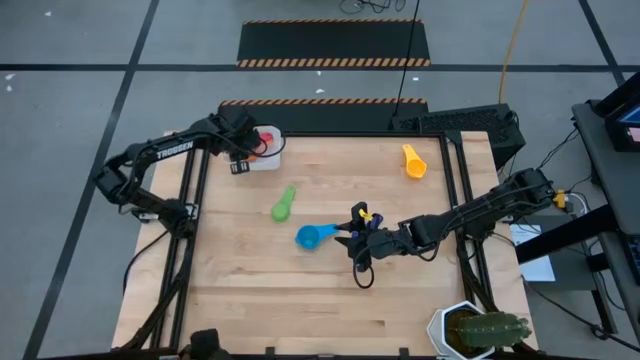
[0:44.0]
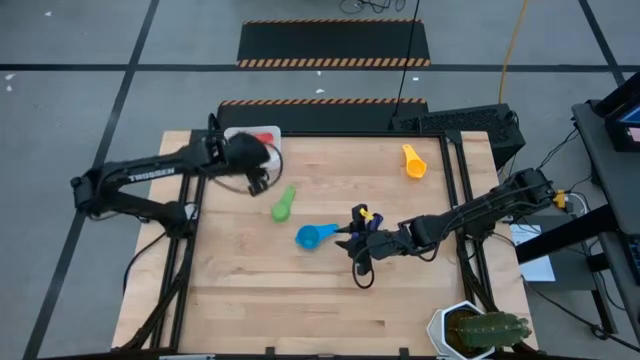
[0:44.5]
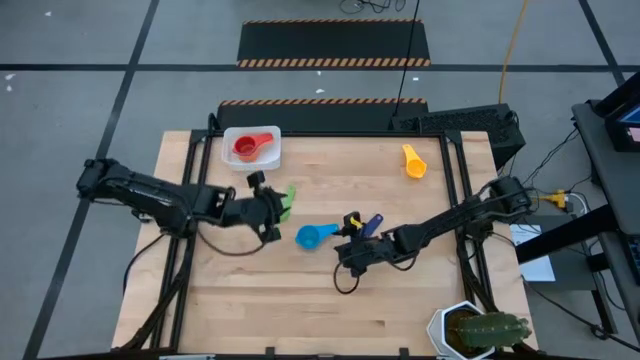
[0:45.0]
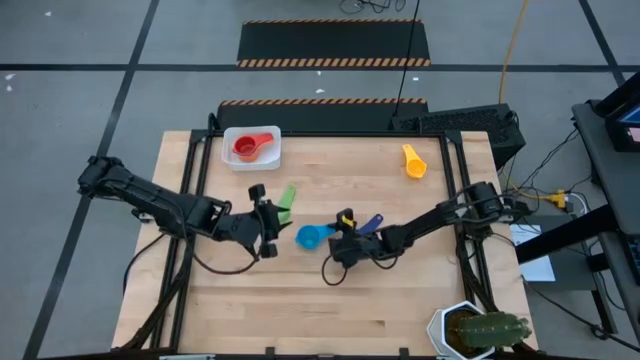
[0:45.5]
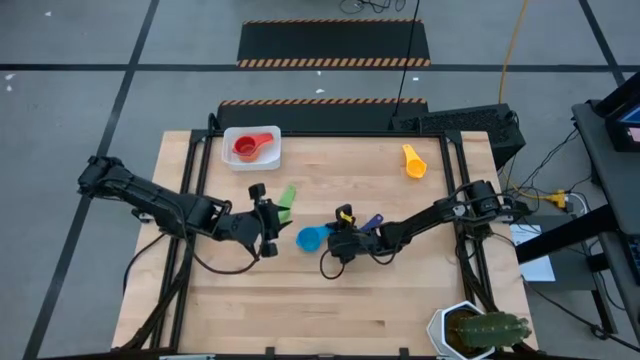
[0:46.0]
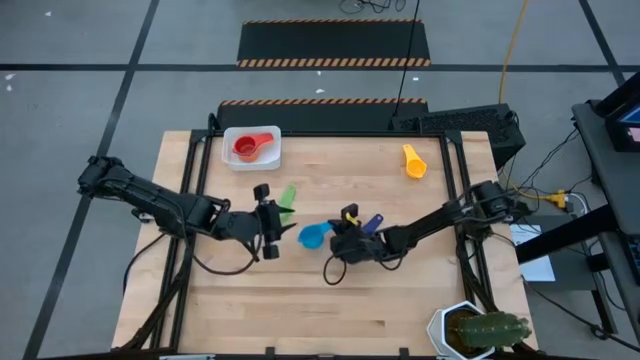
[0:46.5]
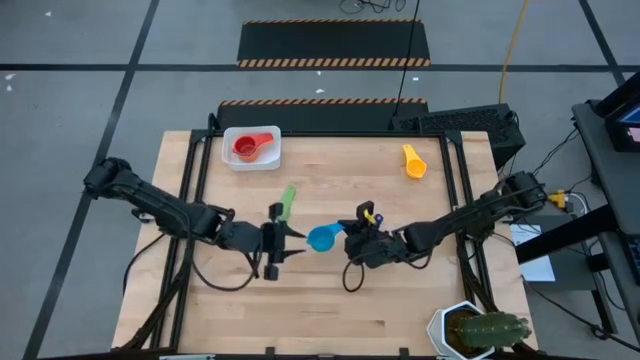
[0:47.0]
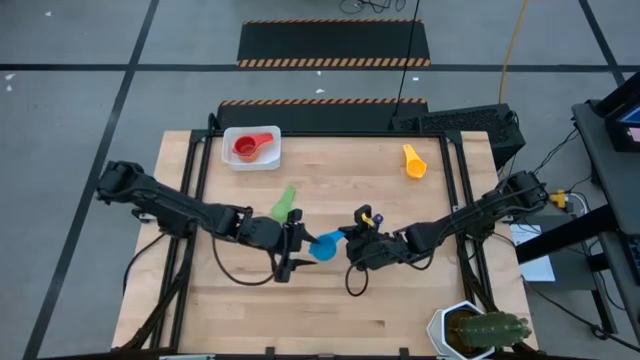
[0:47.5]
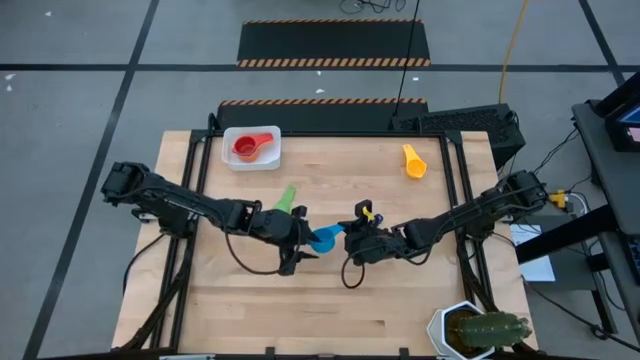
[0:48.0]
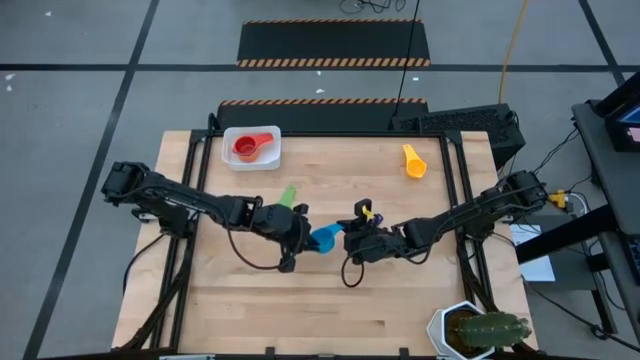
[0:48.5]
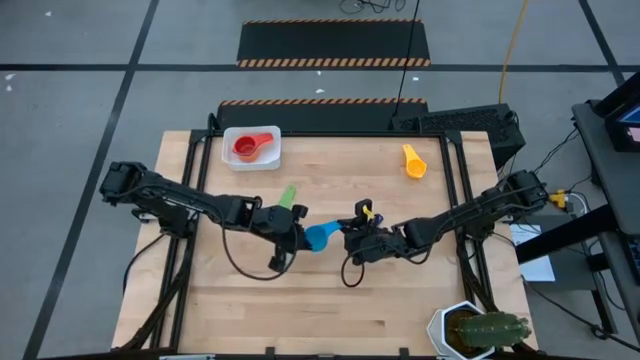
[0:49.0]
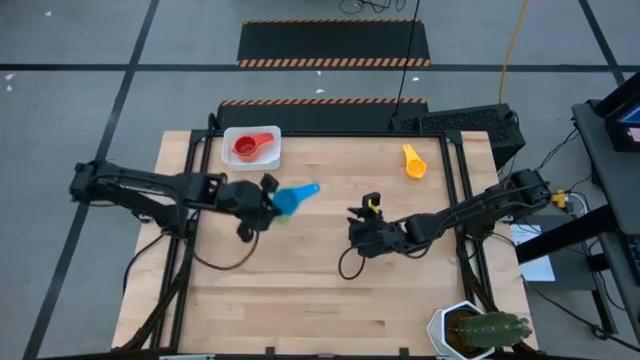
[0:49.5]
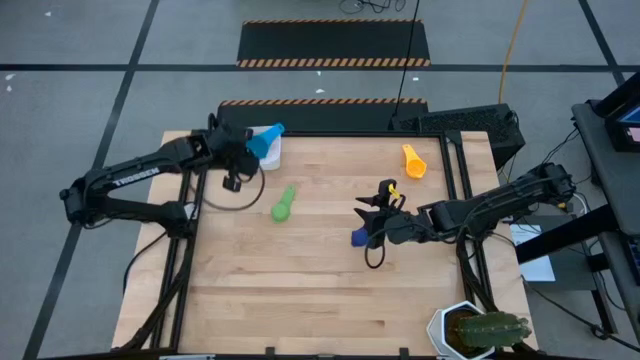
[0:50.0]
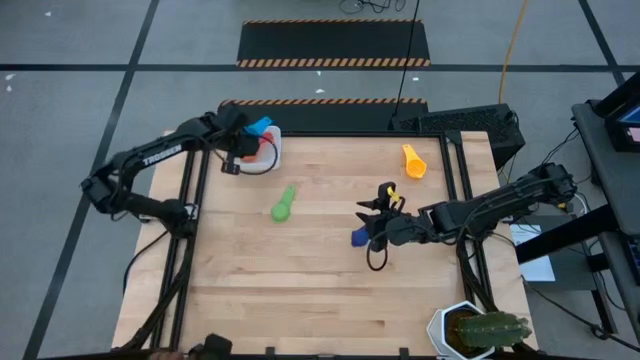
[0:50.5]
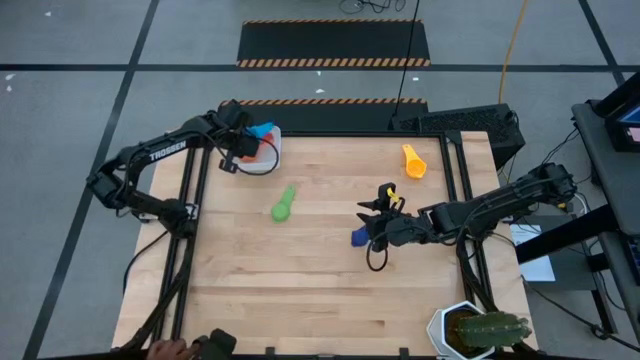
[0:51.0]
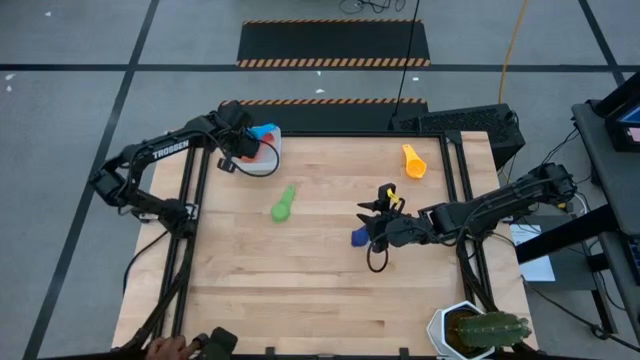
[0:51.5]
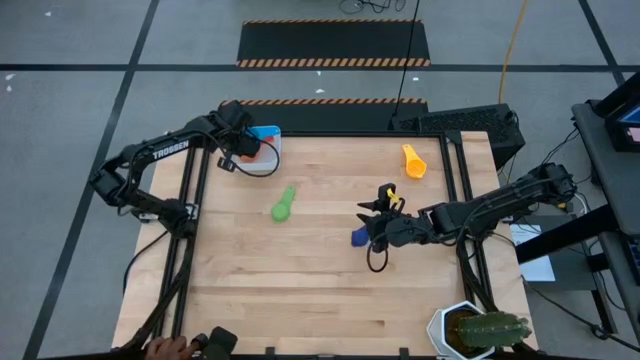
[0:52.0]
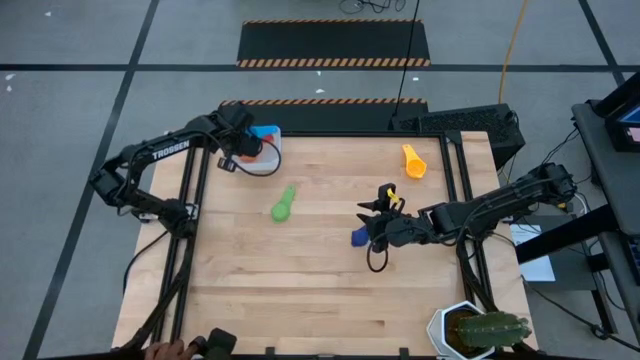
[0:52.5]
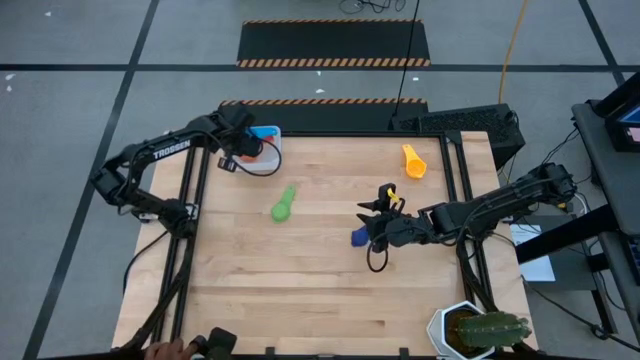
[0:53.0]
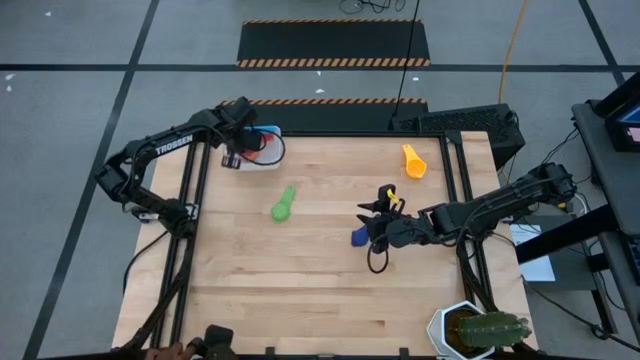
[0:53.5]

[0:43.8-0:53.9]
Task: Nest measuring cups in basket
Stack the light blue measuring cup into the red measuring cup

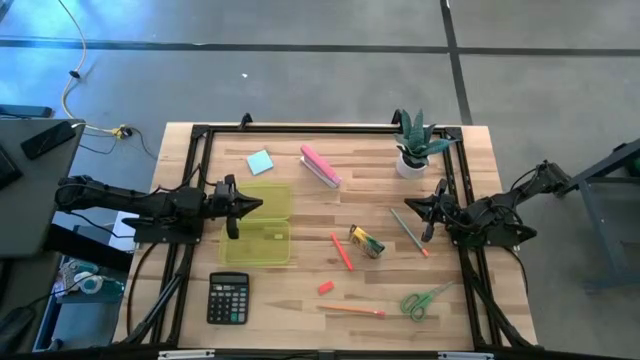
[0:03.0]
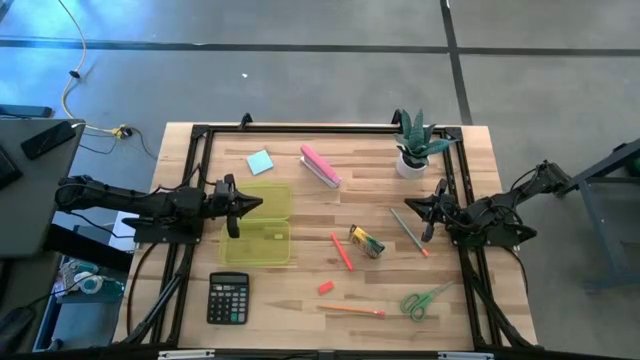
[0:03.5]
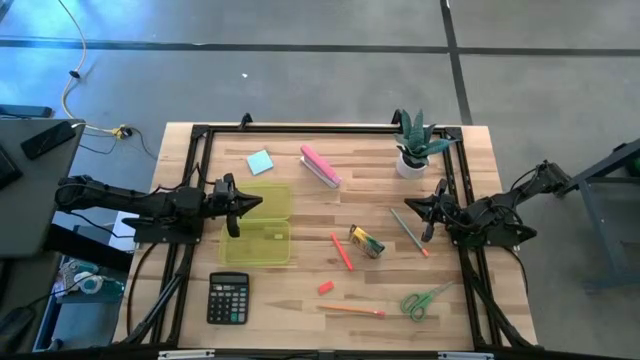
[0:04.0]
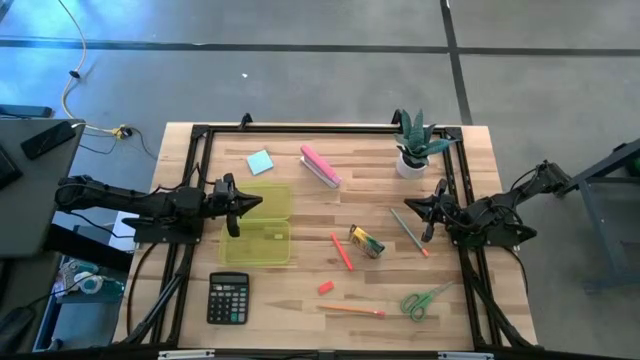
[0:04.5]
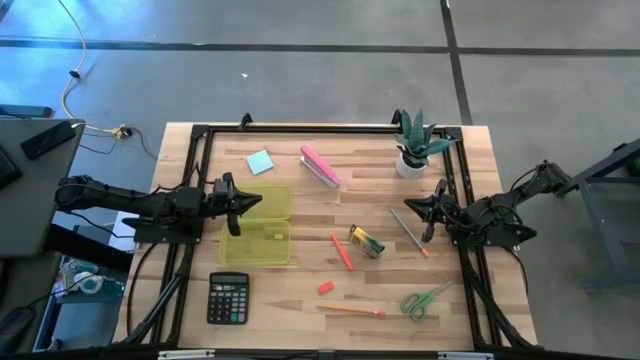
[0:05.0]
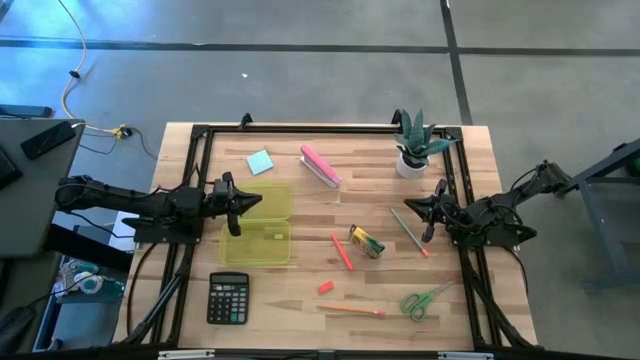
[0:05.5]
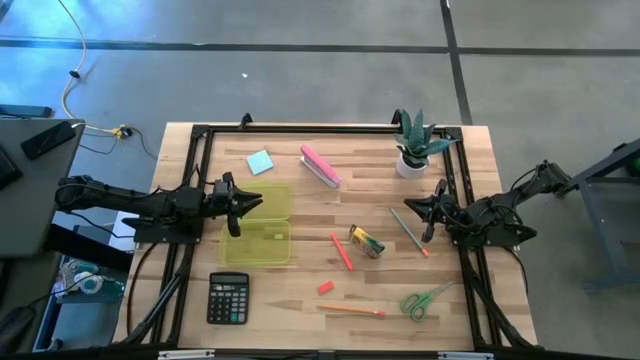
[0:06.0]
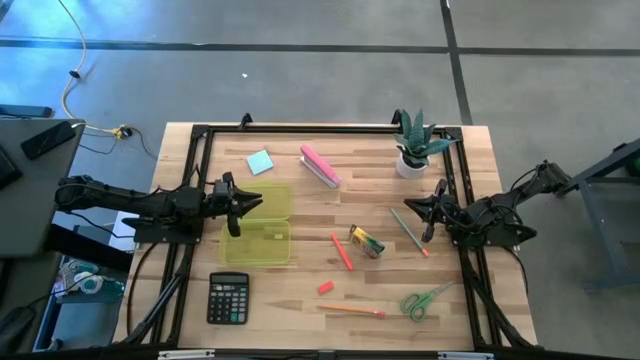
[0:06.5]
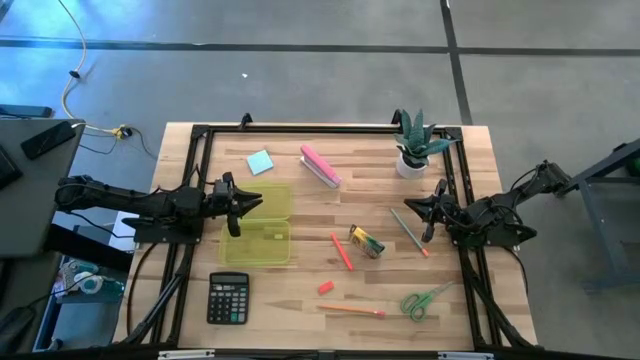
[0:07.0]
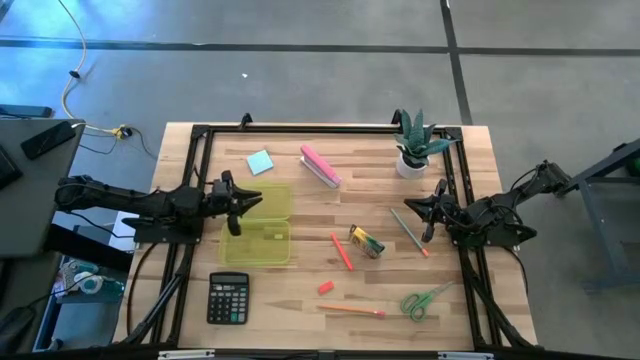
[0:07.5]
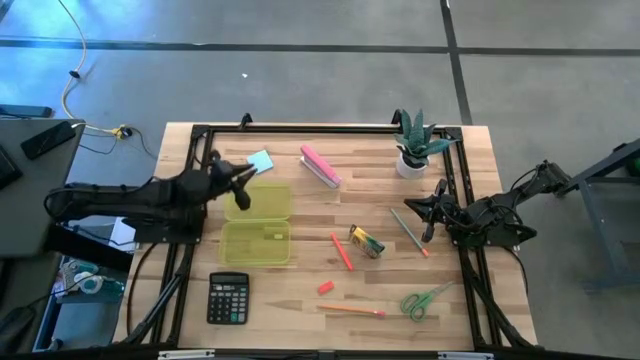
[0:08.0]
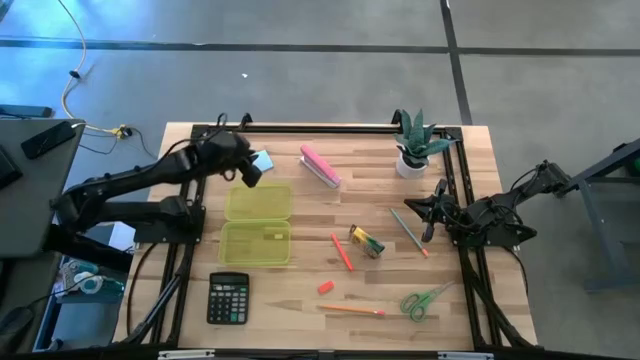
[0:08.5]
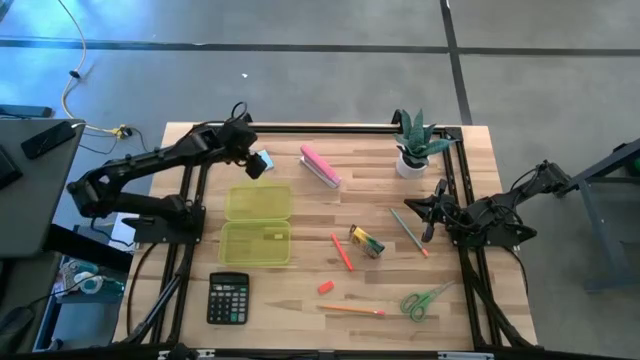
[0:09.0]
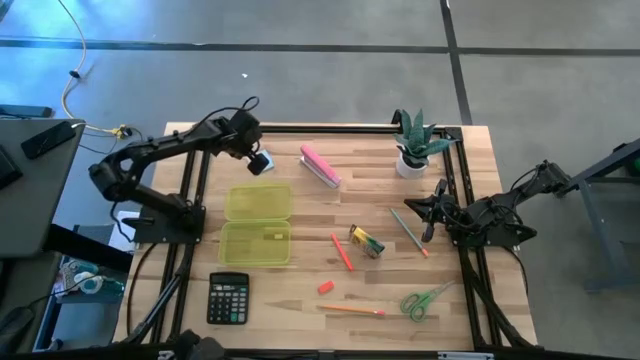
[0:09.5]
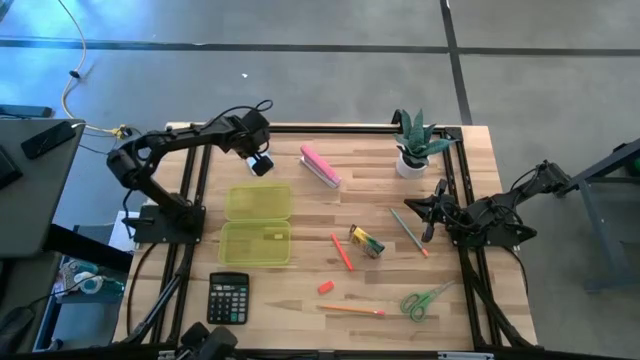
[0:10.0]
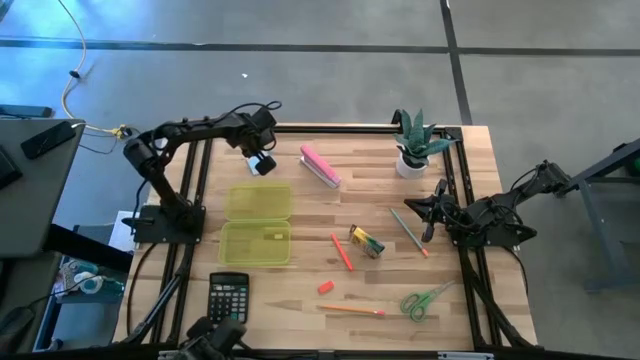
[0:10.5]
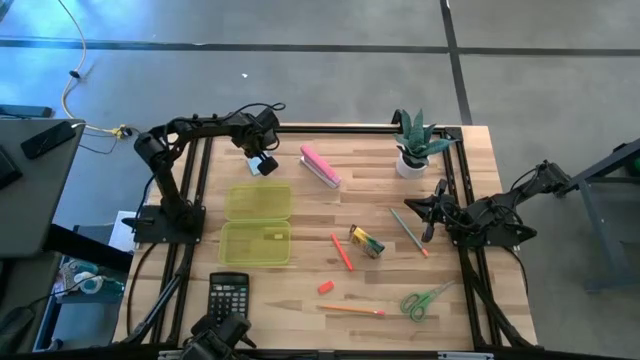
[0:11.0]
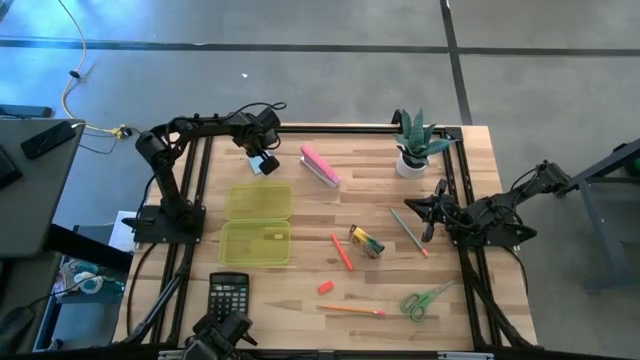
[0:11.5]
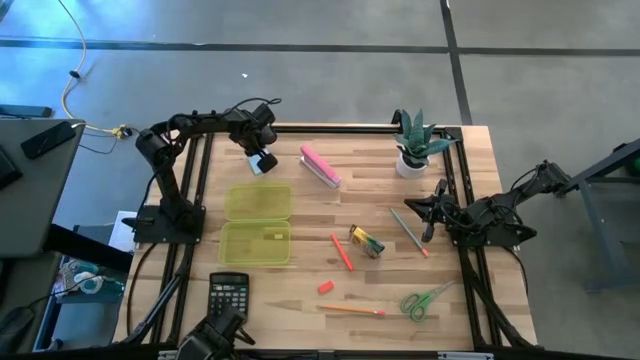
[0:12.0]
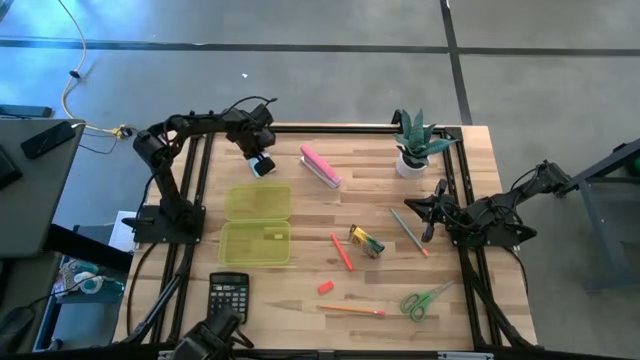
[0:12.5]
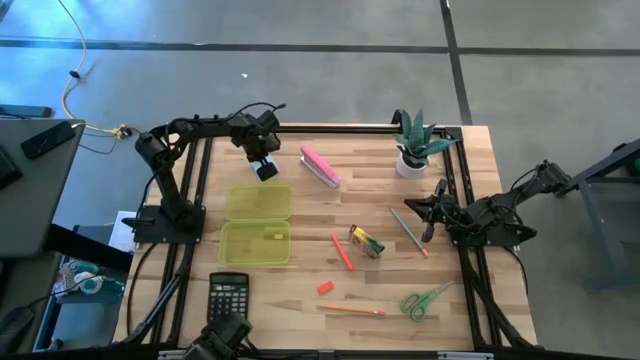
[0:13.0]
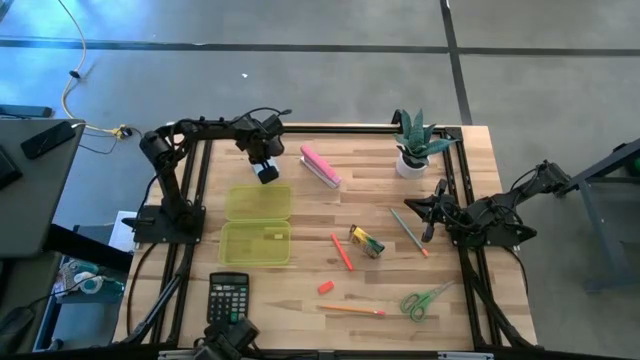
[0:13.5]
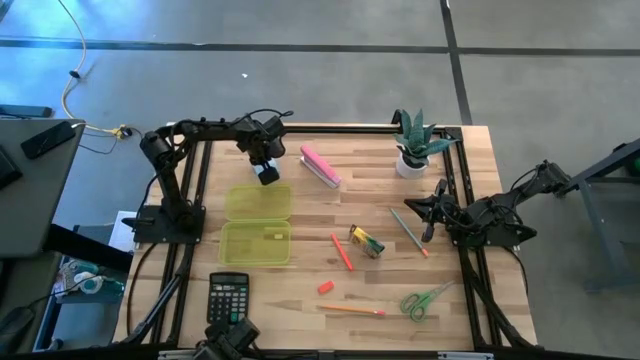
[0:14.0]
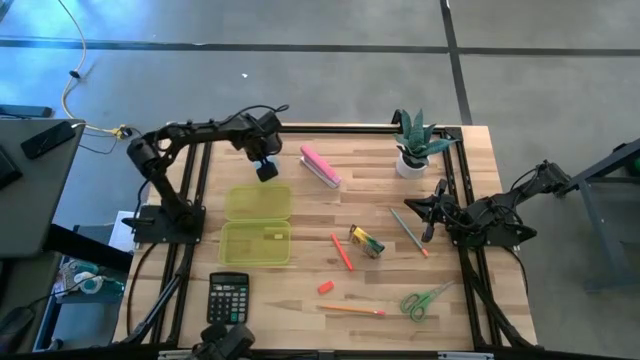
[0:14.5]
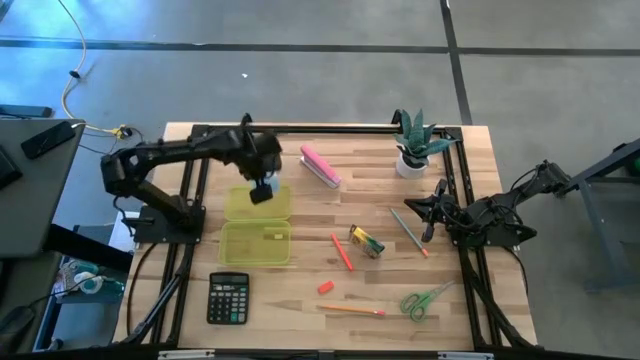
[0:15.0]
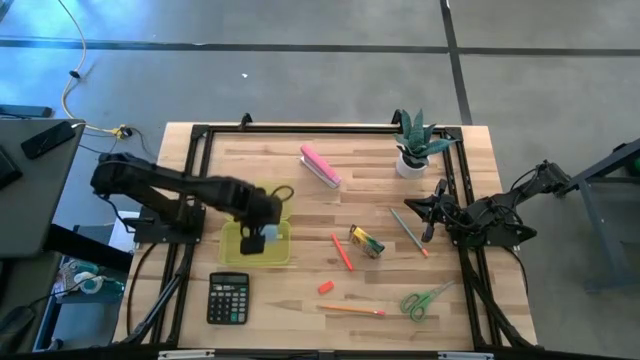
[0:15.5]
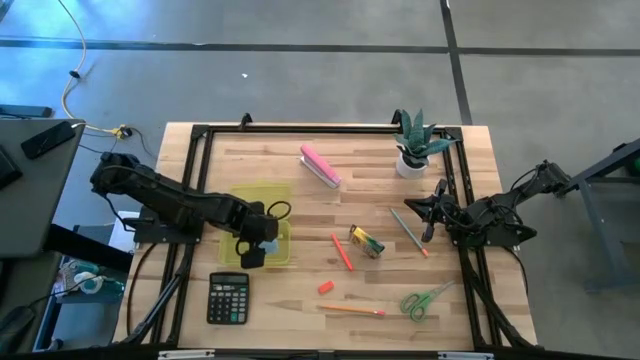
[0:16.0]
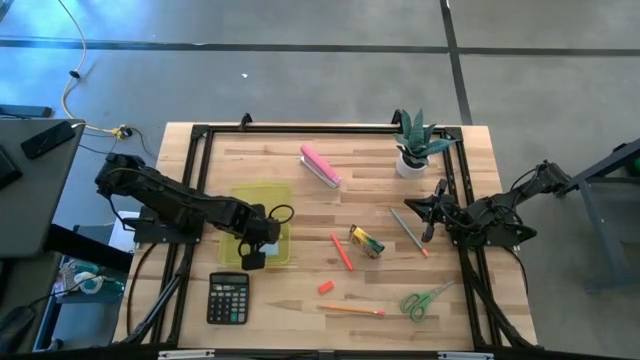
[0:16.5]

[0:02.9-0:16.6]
Task: Pack school essentials
Put the blue sticky notes into the yellow supply box
